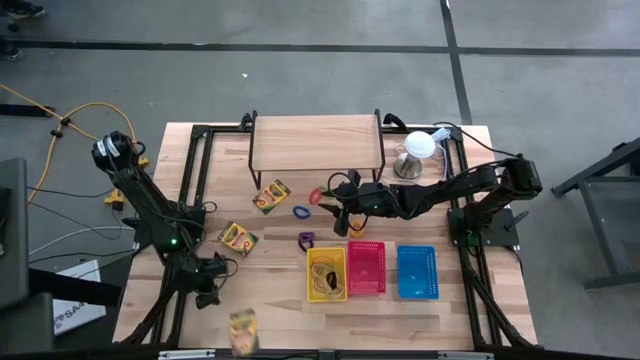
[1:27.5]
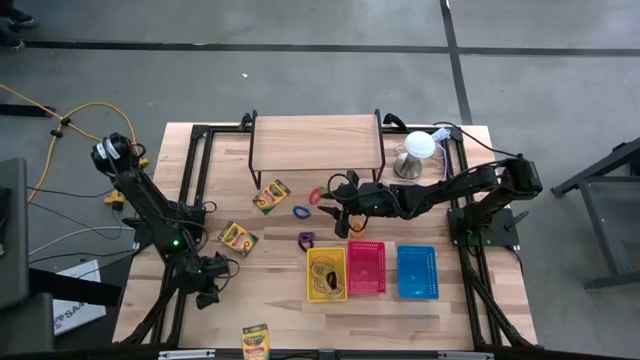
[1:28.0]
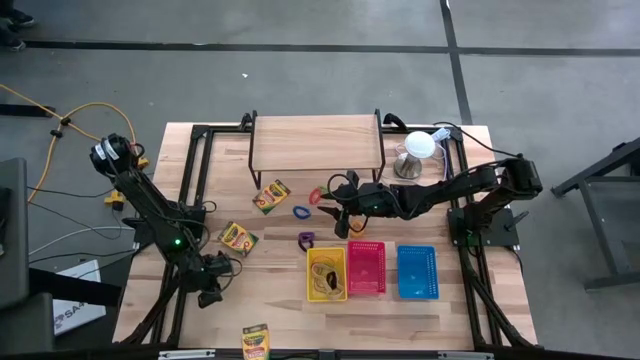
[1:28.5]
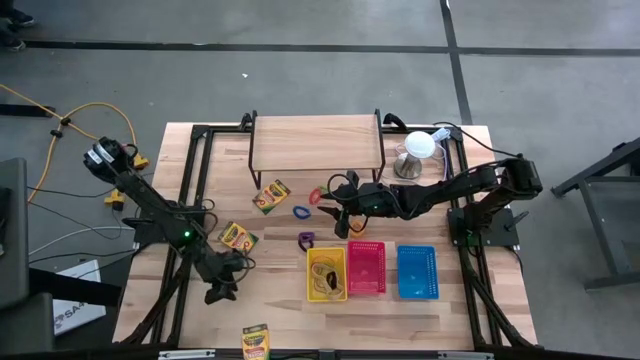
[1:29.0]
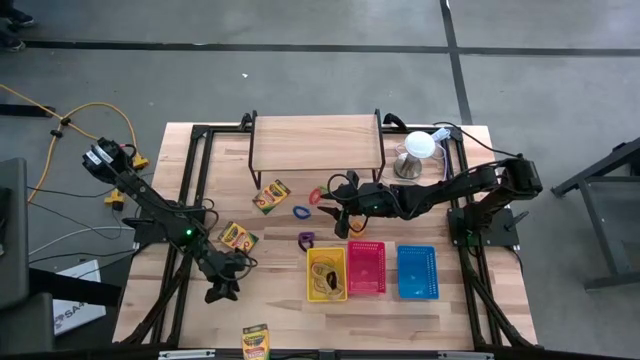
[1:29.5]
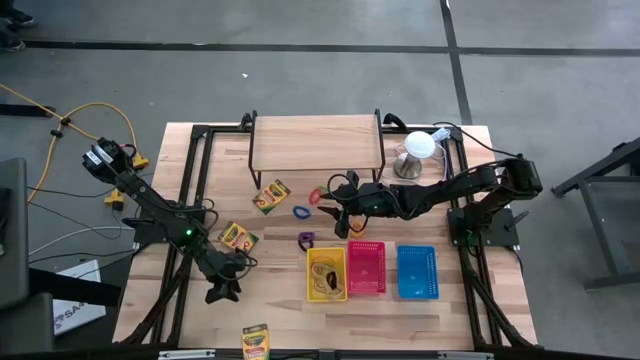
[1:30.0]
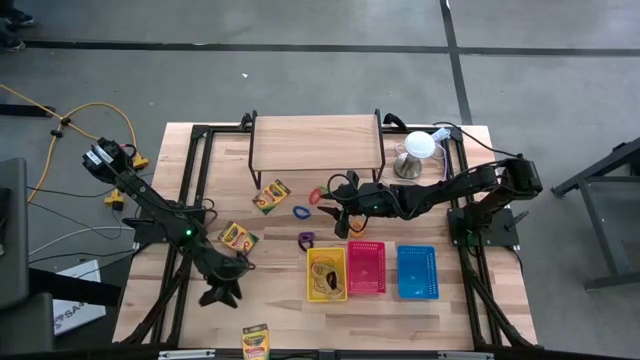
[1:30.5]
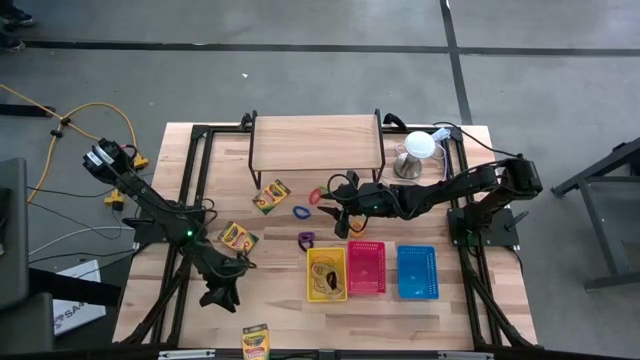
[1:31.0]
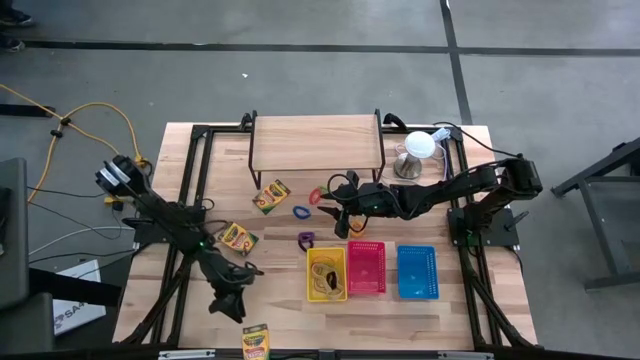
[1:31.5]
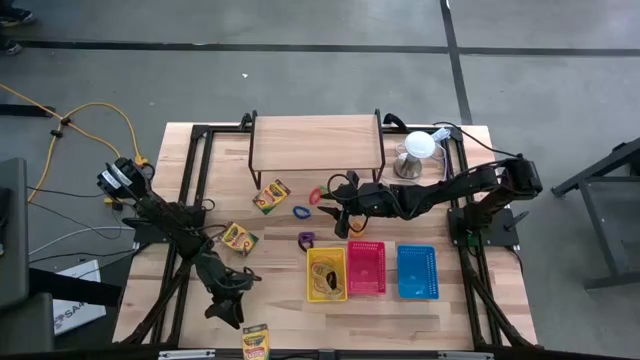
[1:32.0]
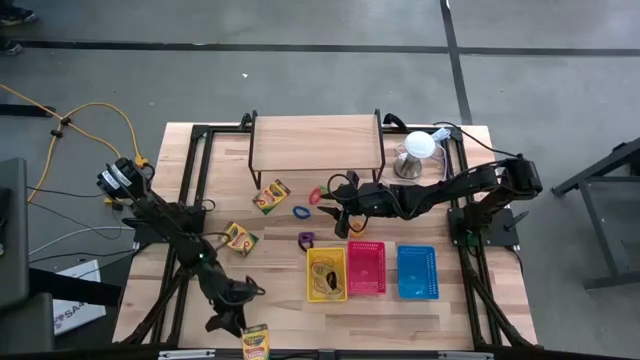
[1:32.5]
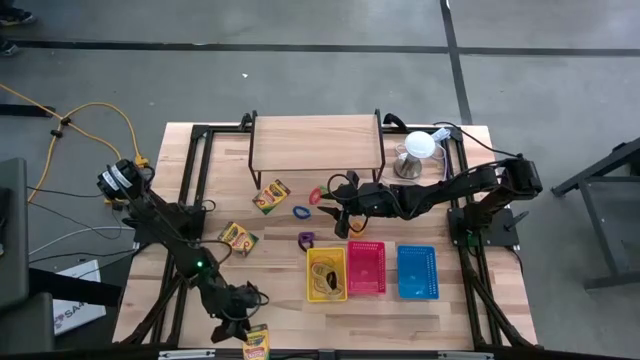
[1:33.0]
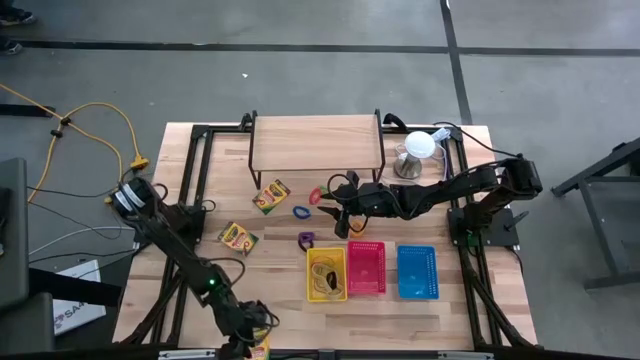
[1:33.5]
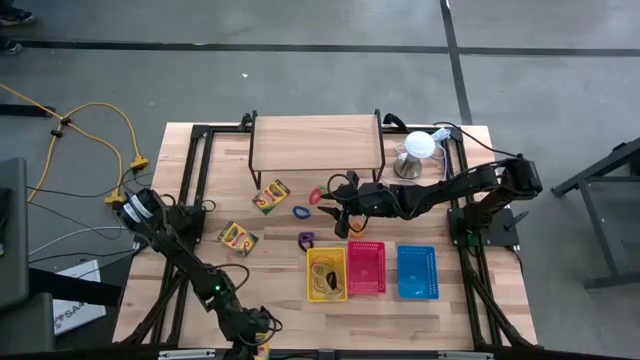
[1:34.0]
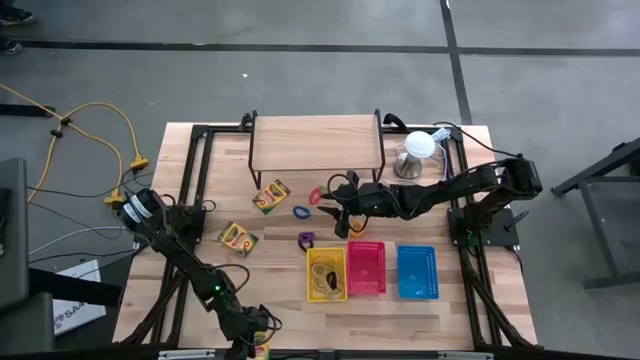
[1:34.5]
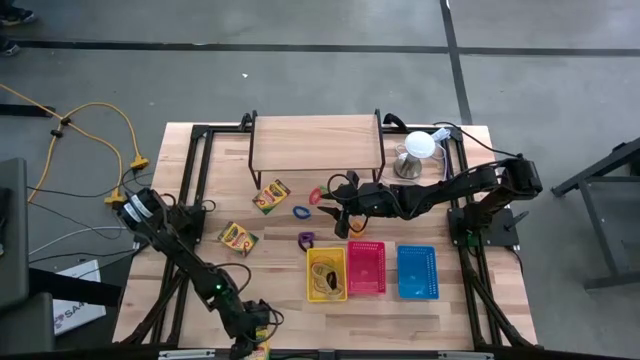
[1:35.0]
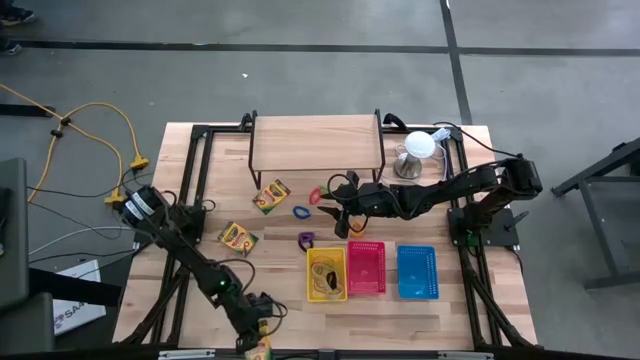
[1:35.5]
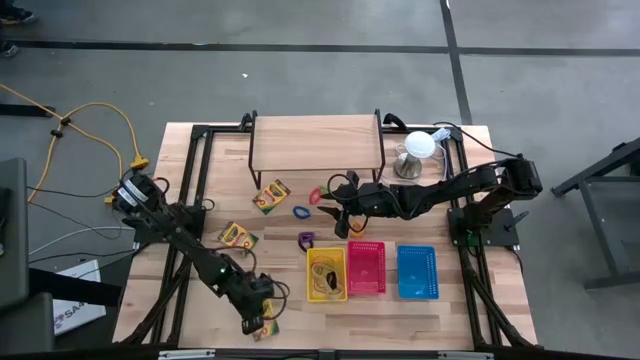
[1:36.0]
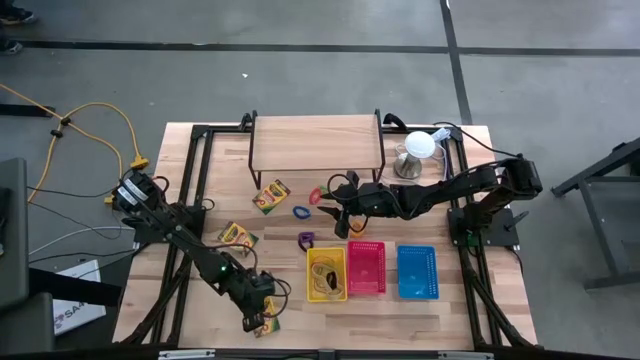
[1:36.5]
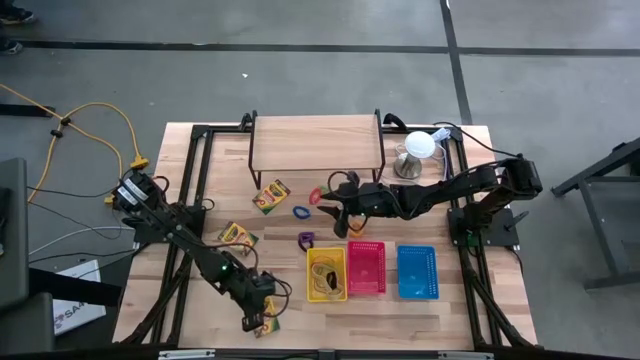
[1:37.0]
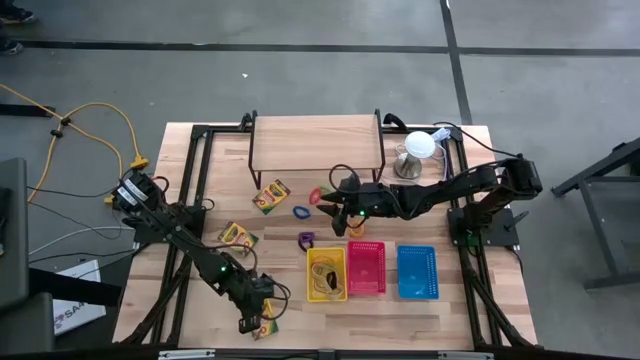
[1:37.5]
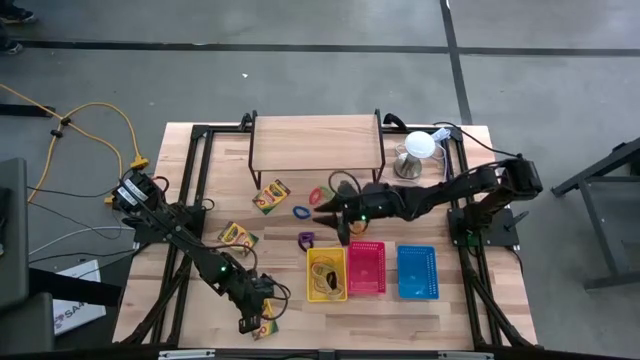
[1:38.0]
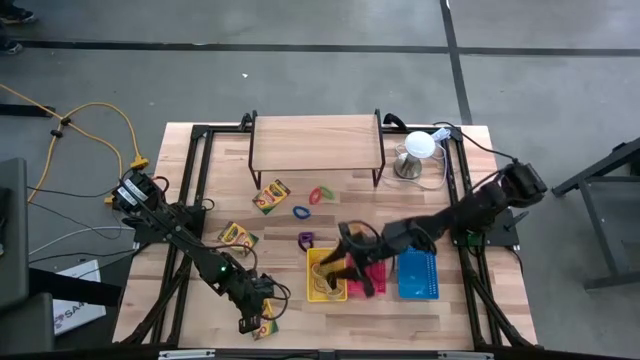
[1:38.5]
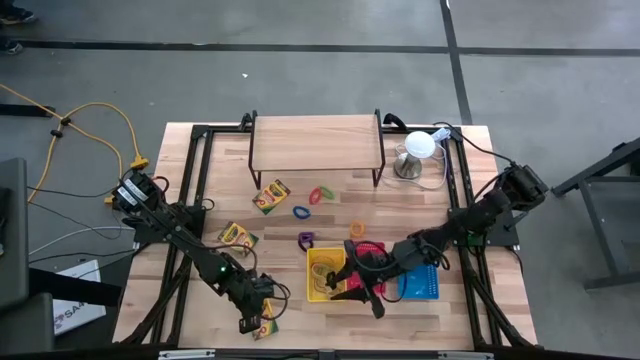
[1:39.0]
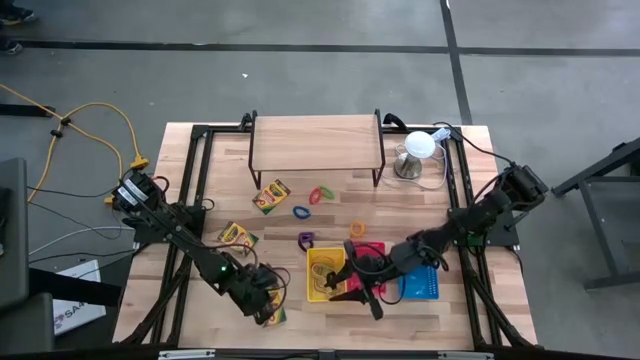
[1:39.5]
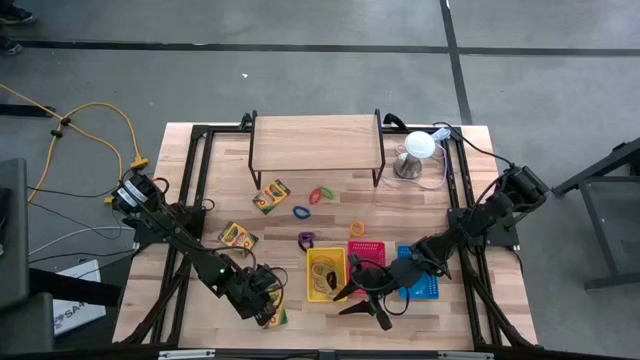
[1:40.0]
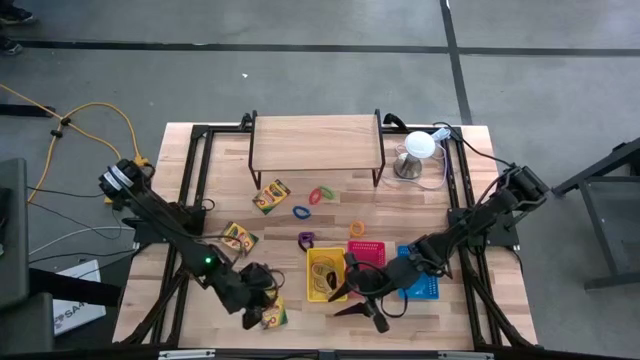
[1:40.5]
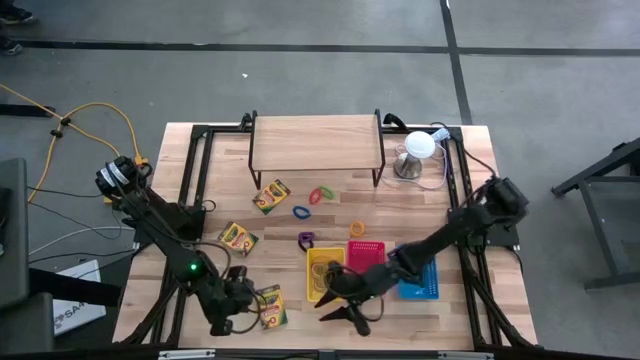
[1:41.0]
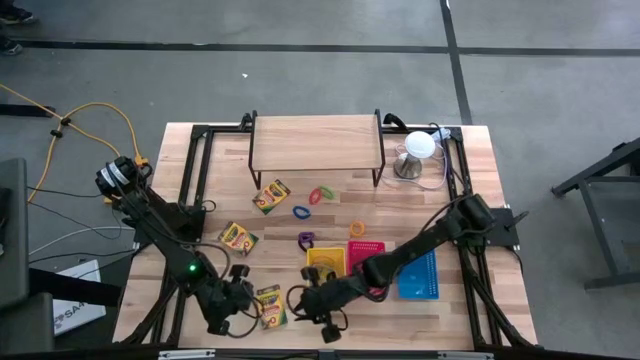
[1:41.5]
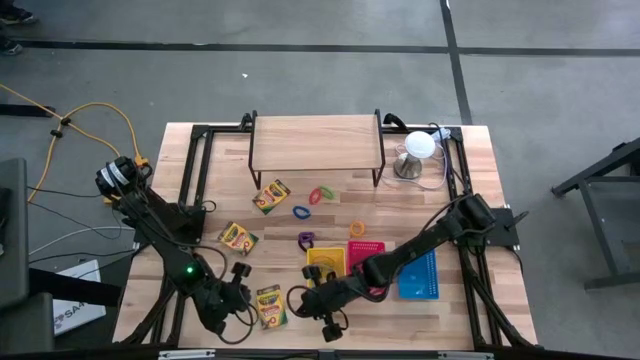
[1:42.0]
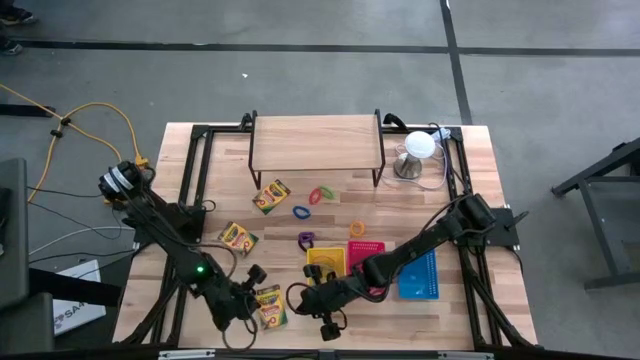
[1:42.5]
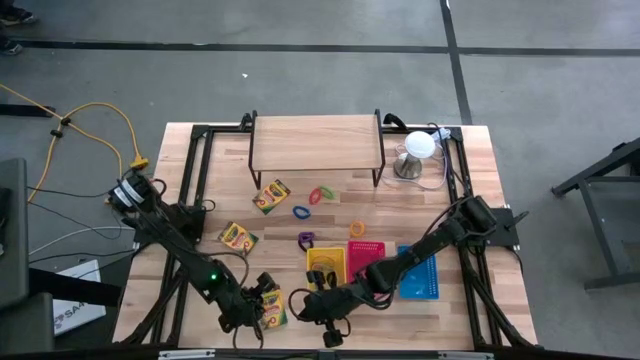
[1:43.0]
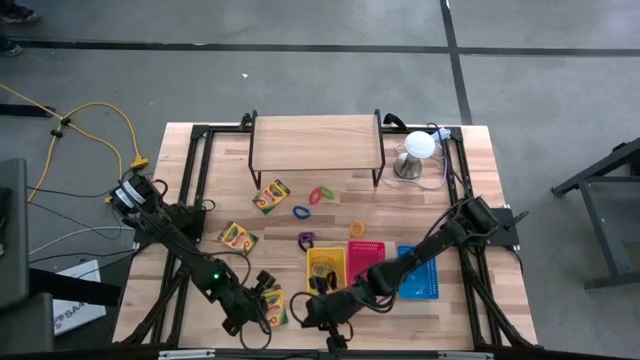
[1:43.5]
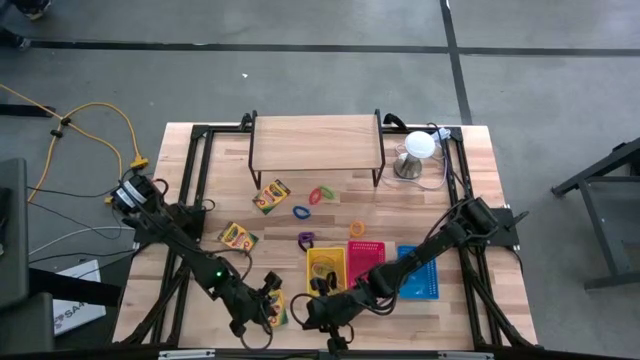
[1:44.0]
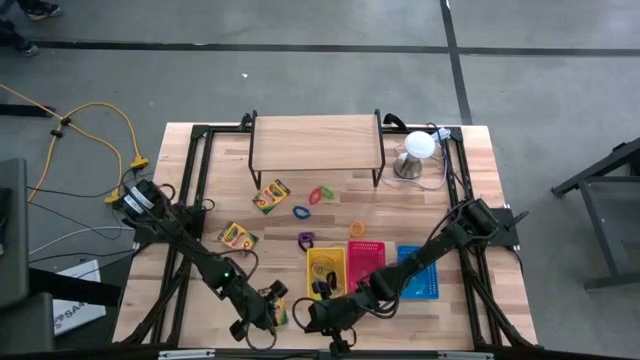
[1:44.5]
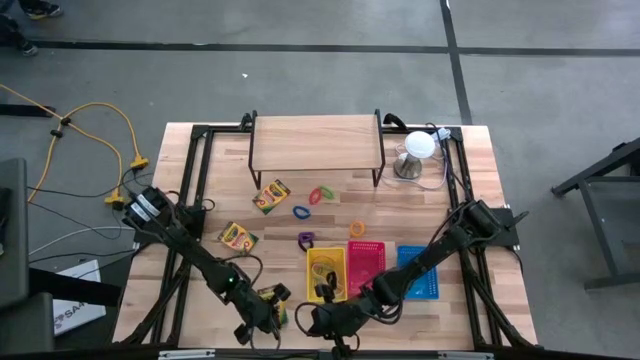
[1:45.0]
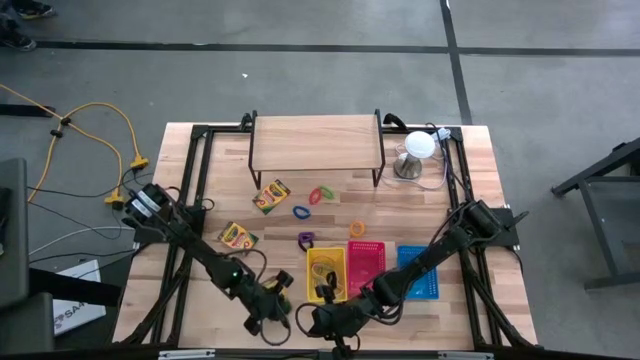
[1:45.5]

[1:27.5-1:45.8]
Task: Pick & Place Office Desk Supplies
Put the bottom crayon box into the red bin

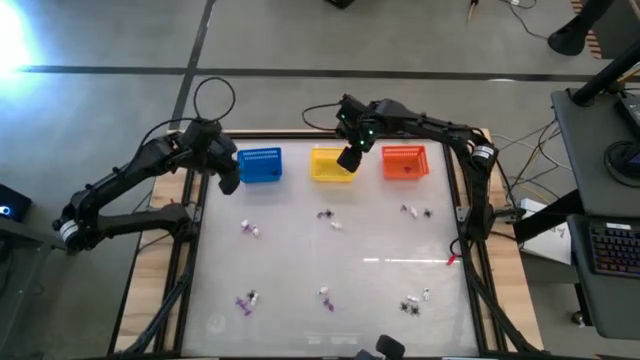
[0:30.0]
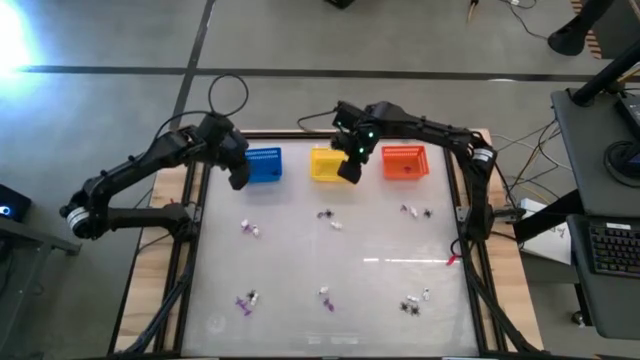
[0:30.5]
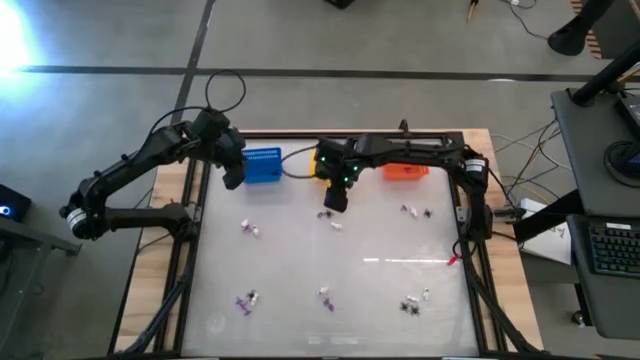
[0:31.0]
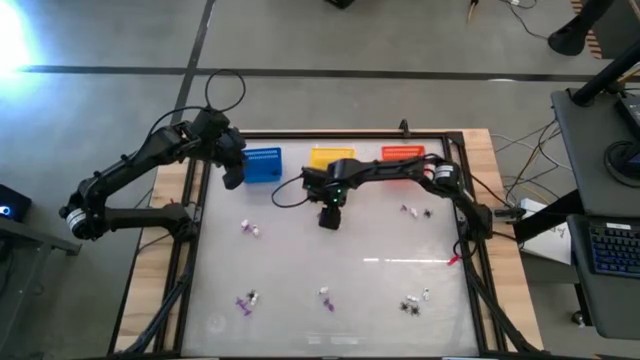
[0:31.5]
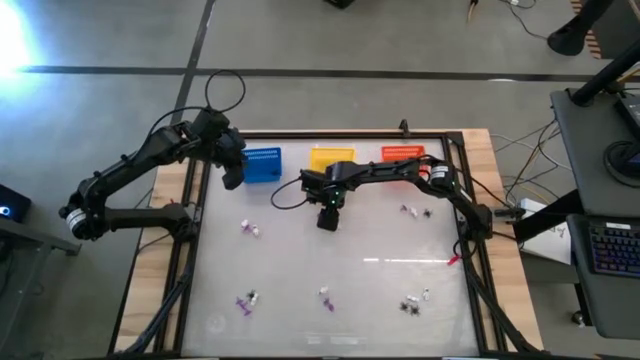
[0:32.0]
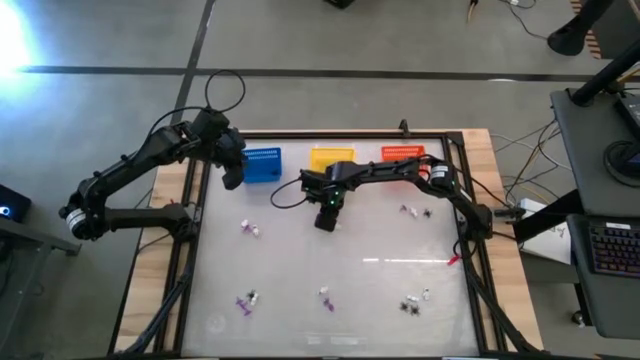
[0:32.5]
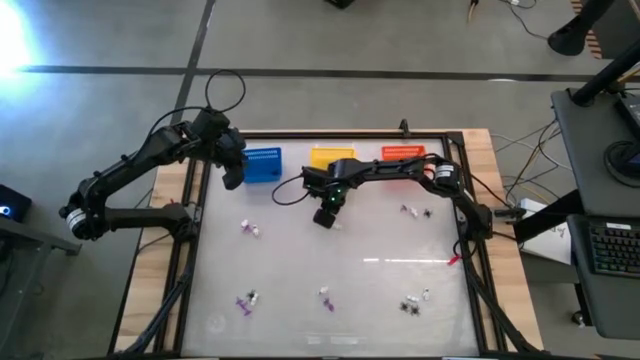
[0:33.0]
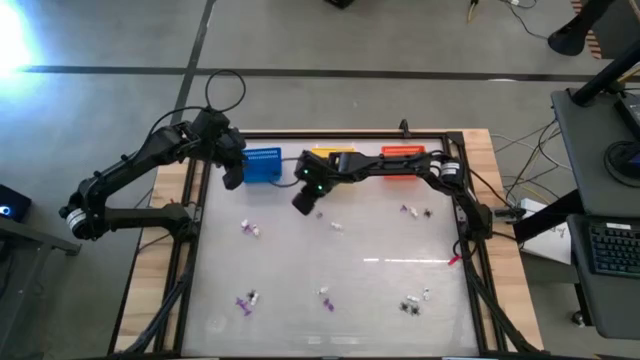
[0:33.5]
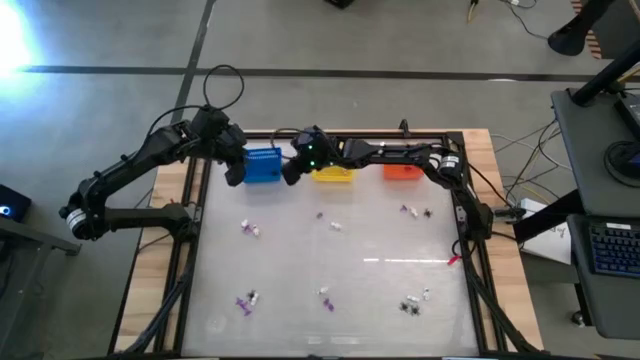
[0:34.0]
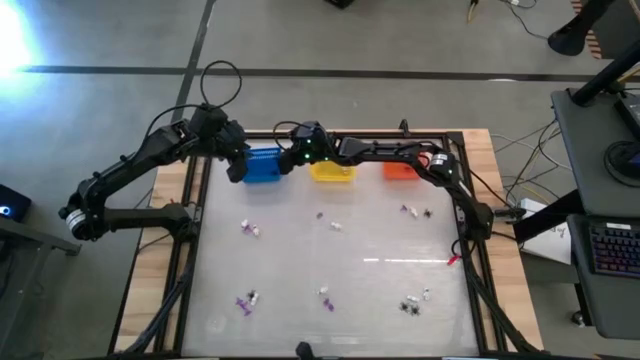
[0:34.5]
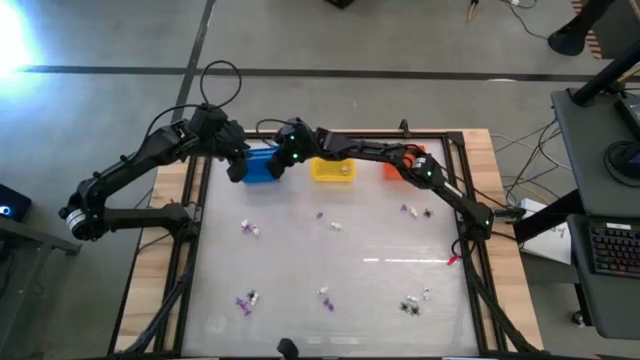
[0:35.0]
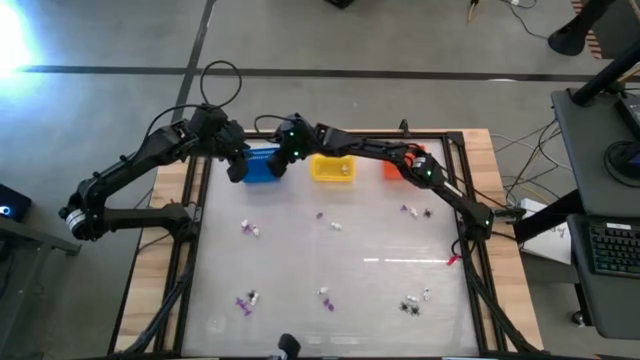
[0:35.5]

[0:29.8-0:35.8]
Task: Sort Halloween decoration
Put the black spider toy into the blue bin
